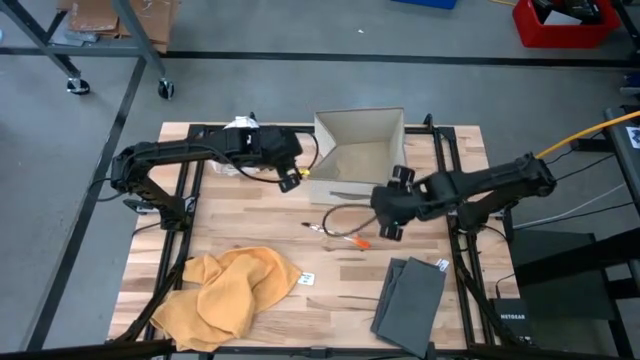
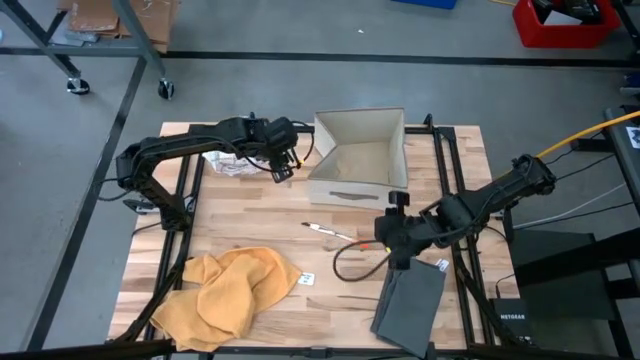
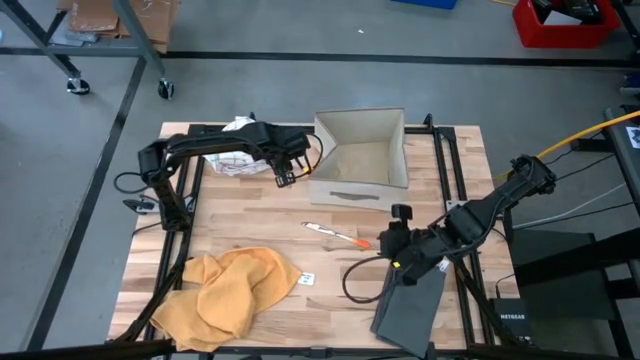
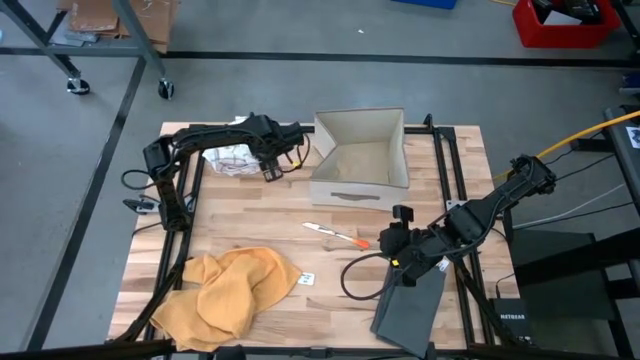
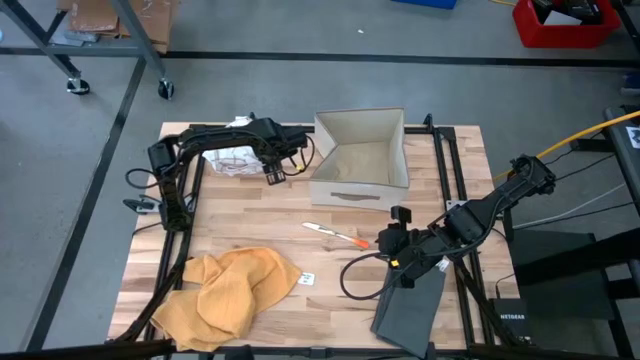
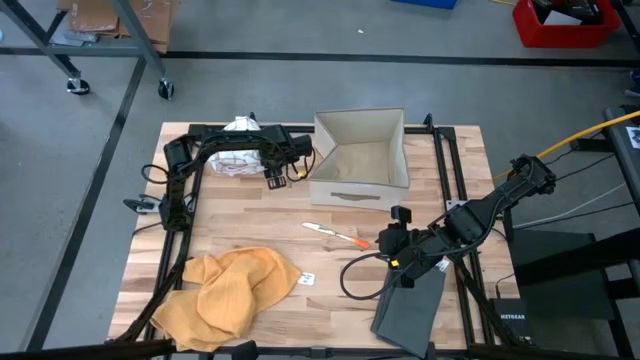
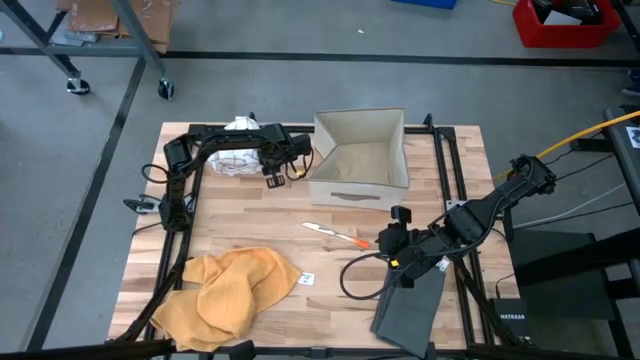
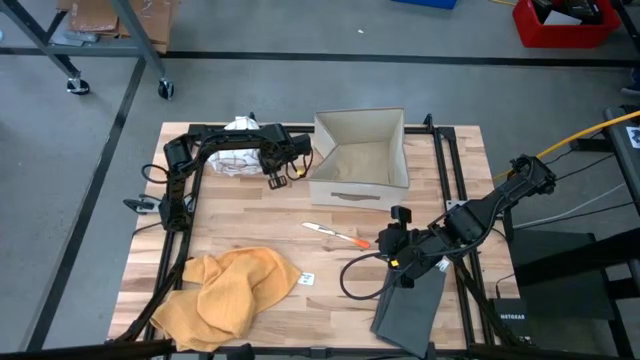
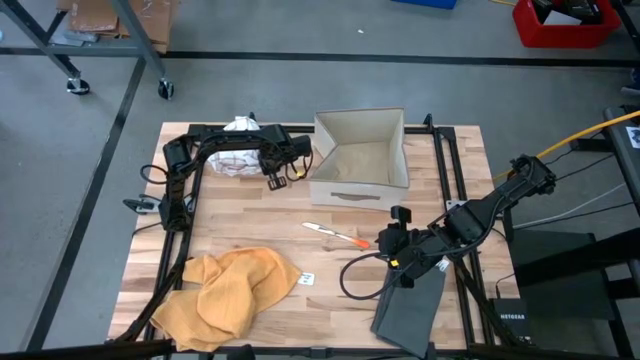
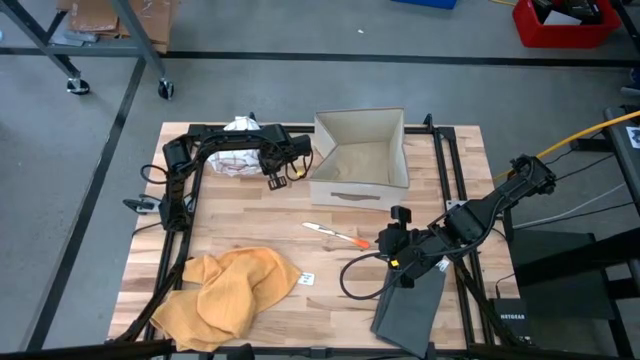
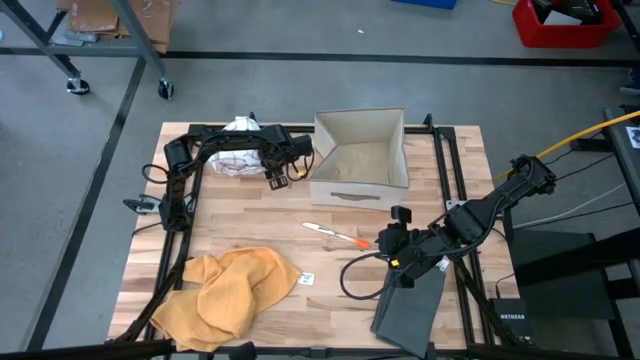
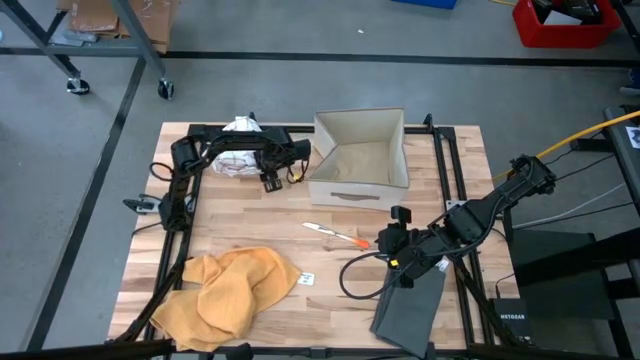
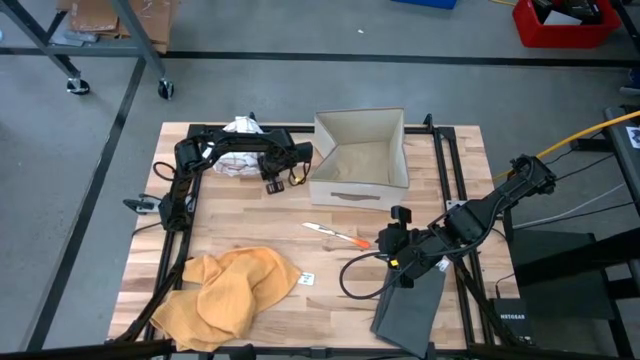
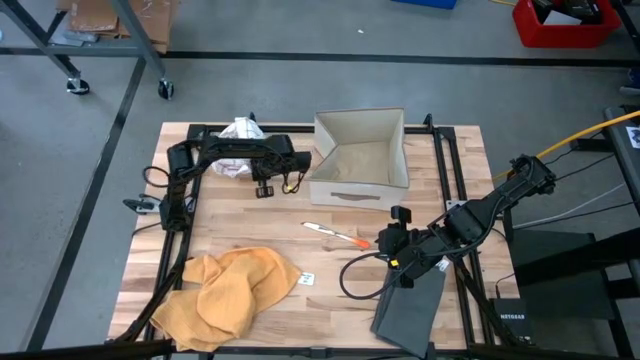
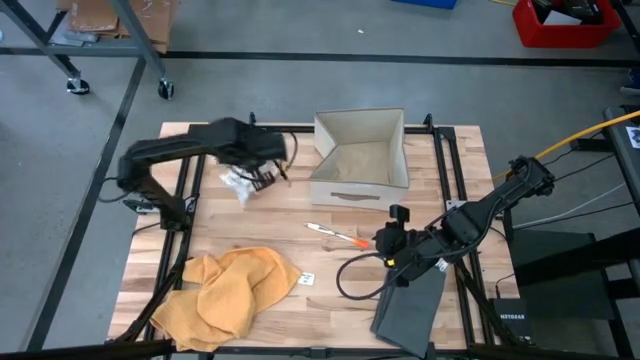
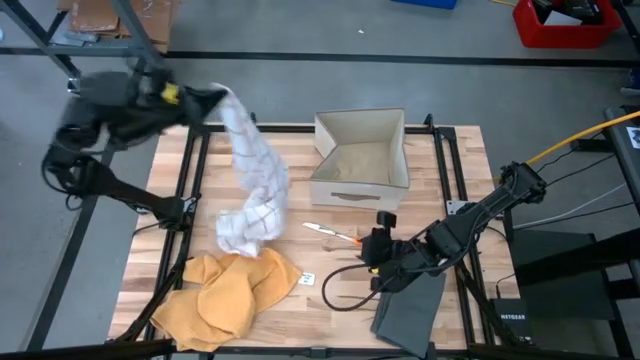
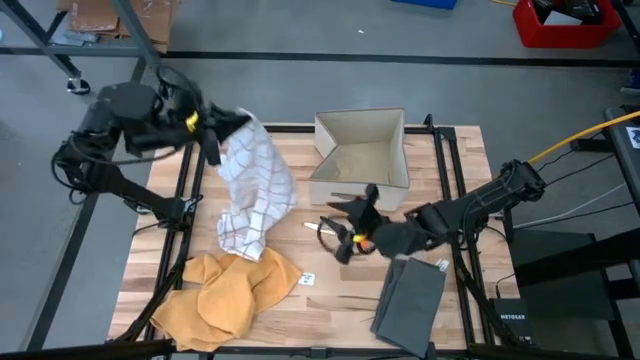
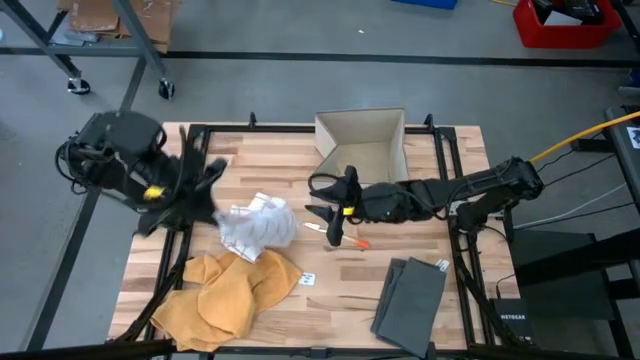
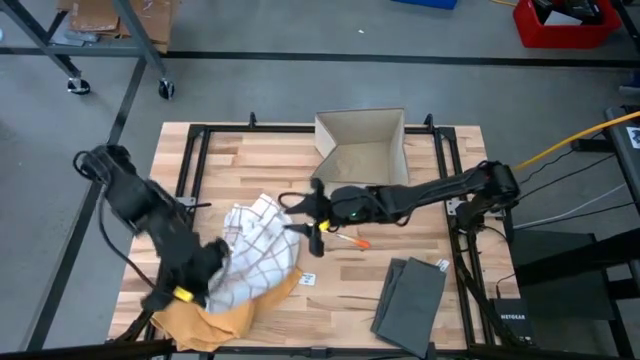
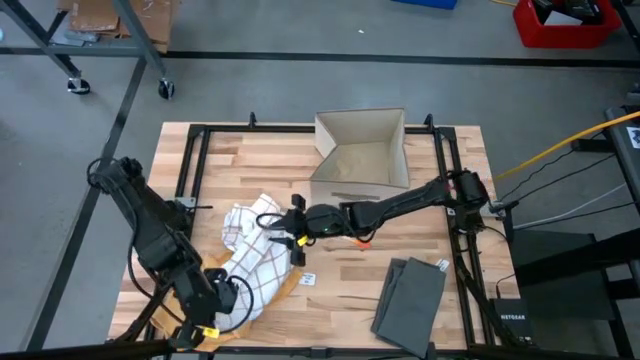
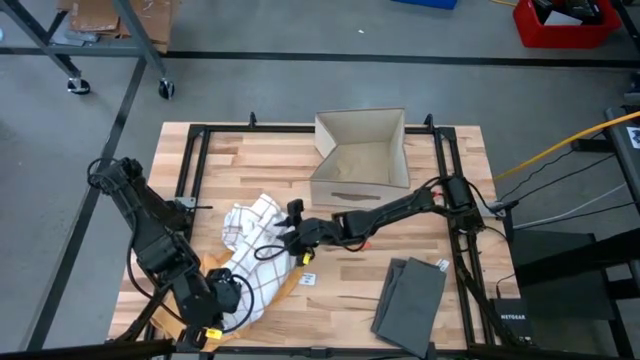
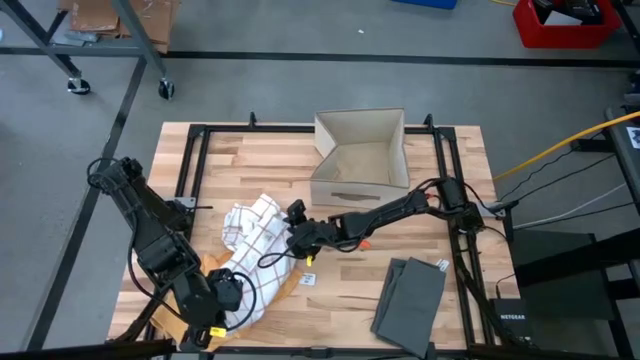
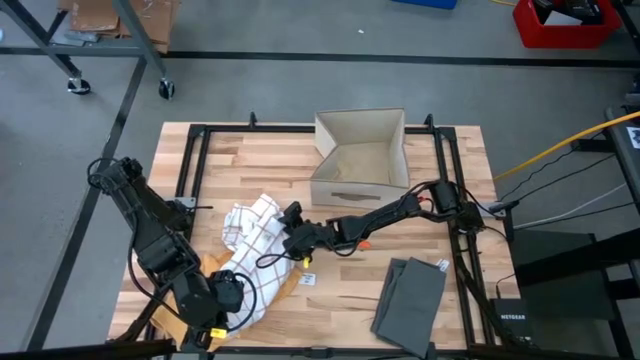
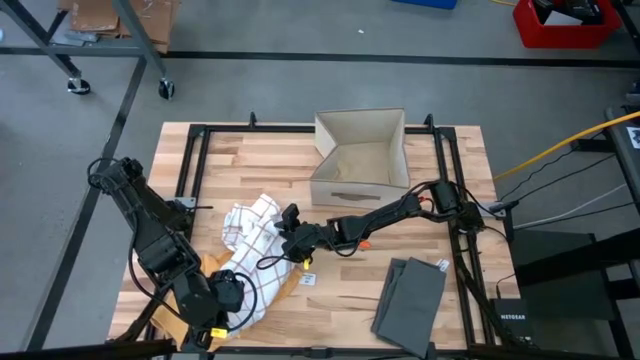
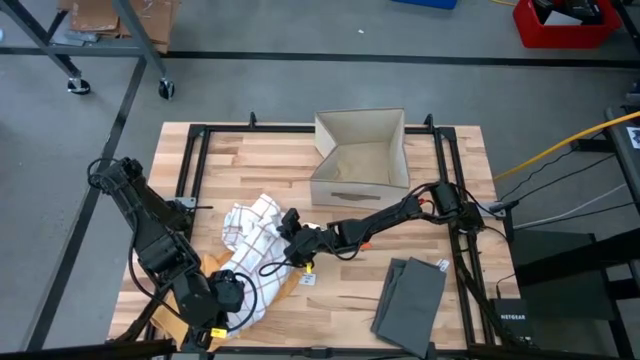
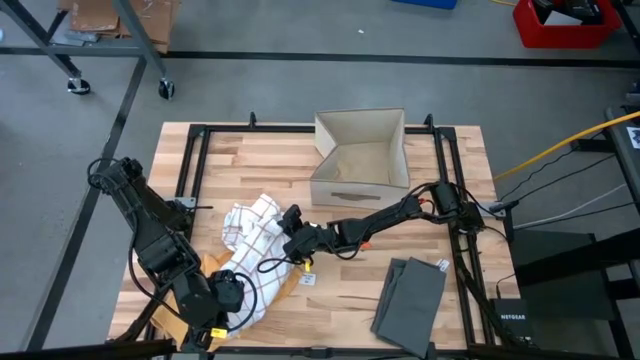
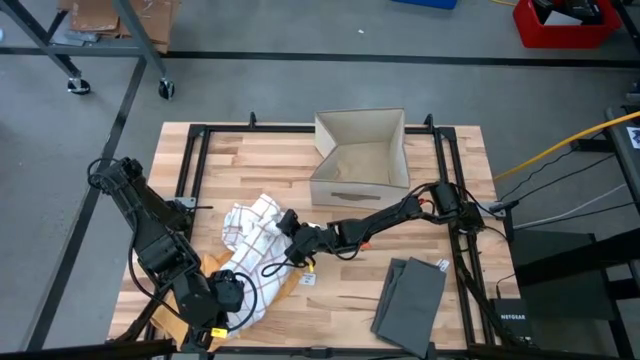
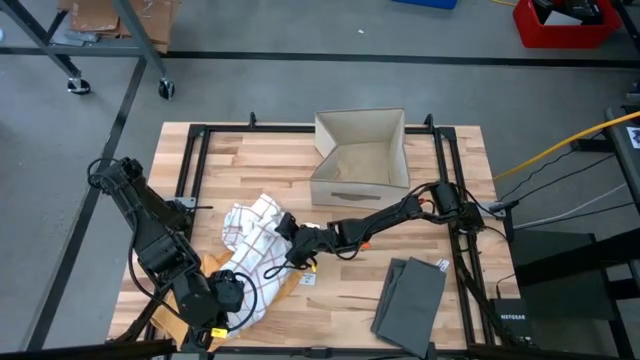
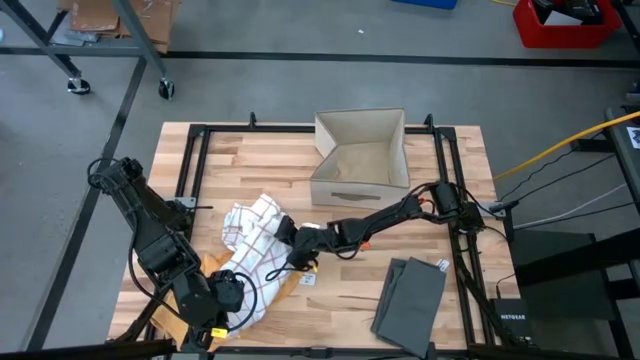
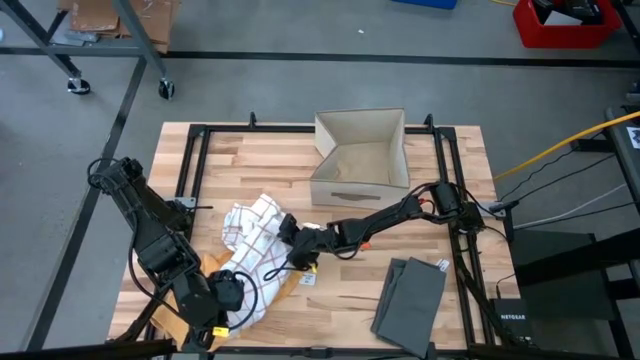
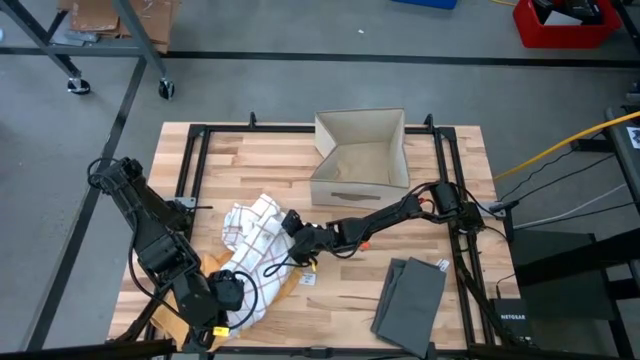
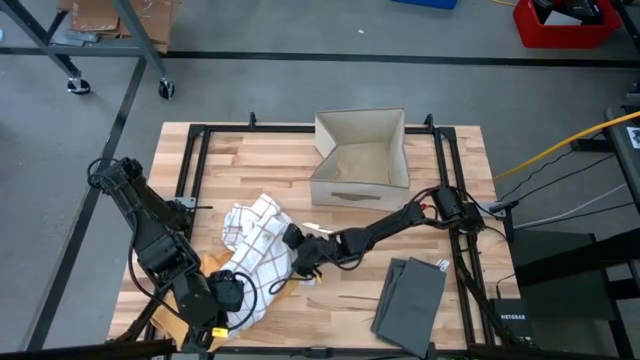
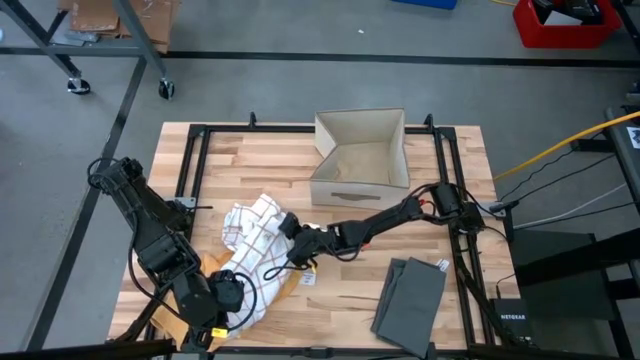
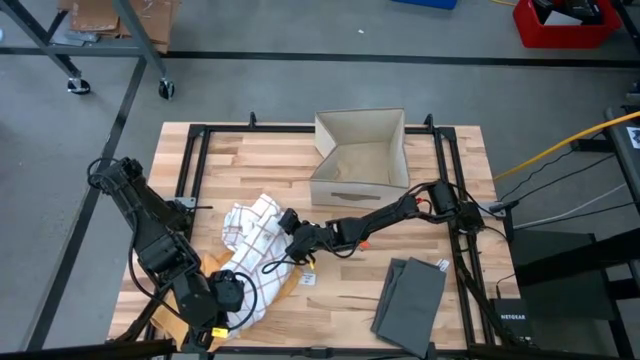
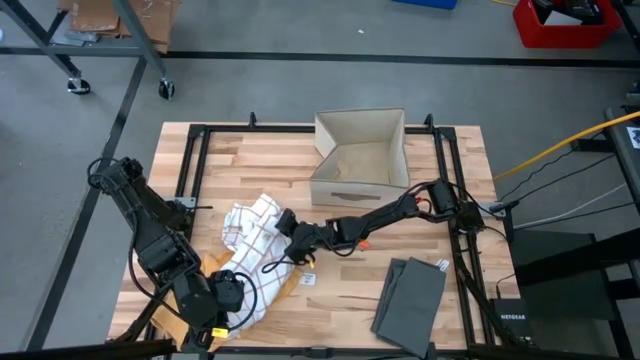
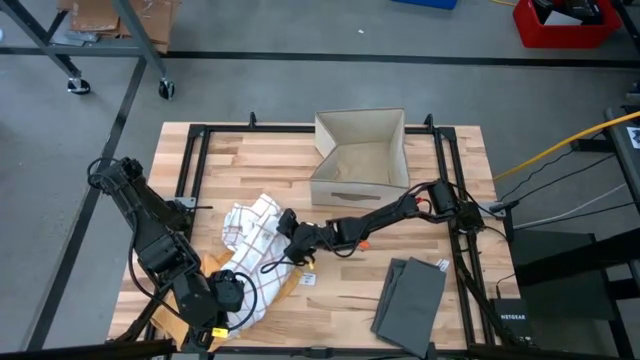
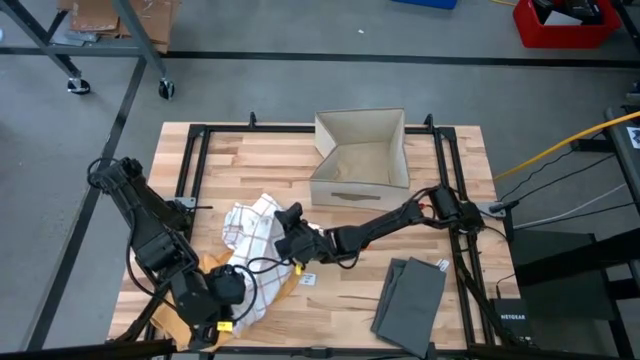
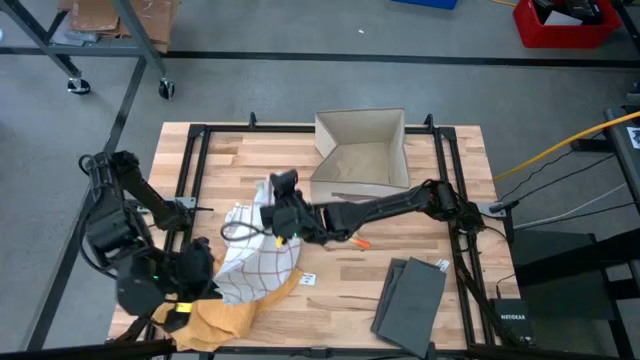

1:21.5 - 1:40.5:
Task: Fold towel
Fold the white kitchen towel
